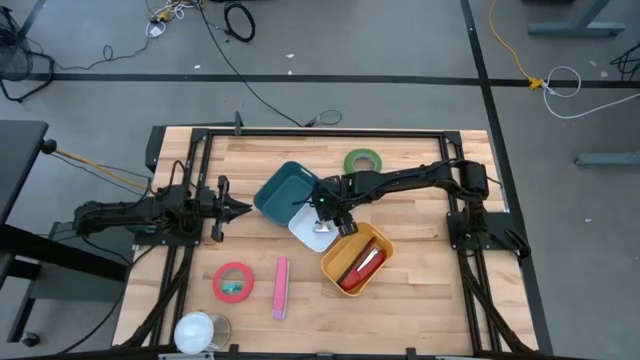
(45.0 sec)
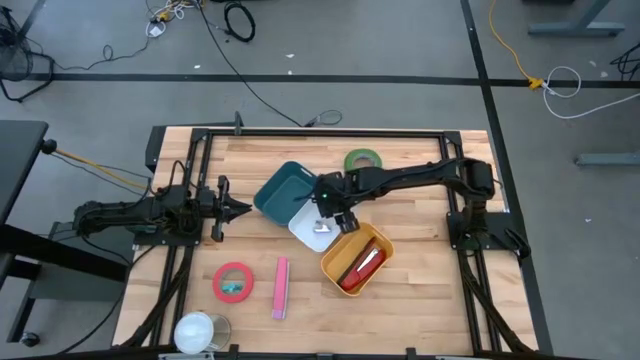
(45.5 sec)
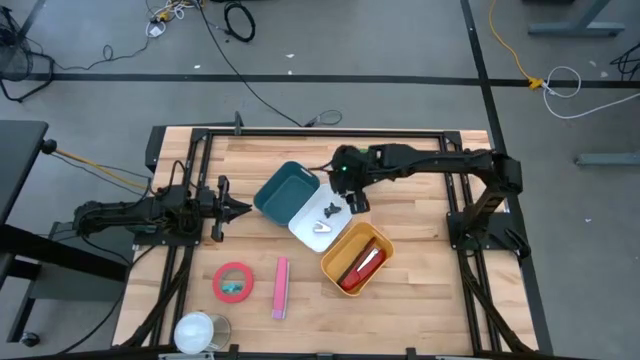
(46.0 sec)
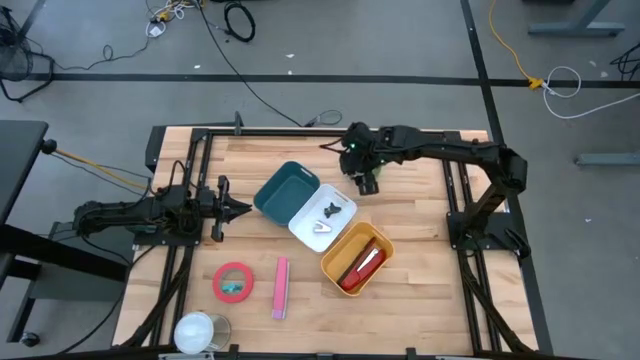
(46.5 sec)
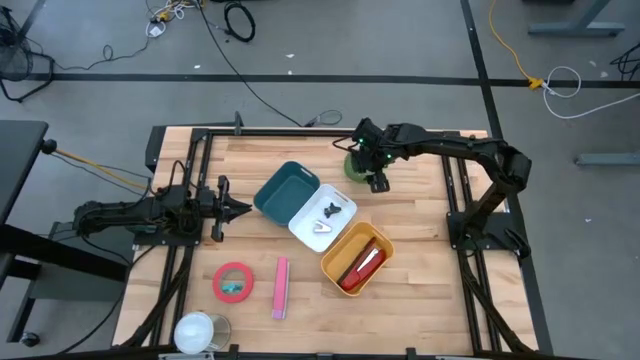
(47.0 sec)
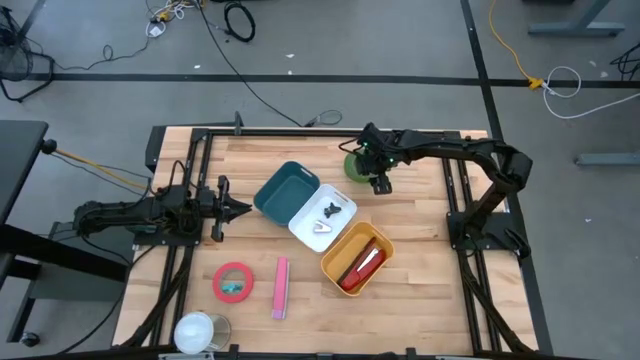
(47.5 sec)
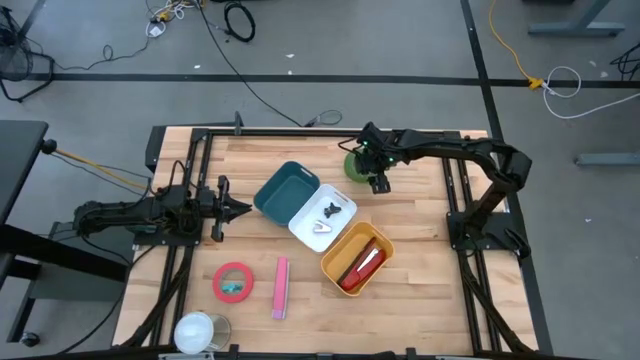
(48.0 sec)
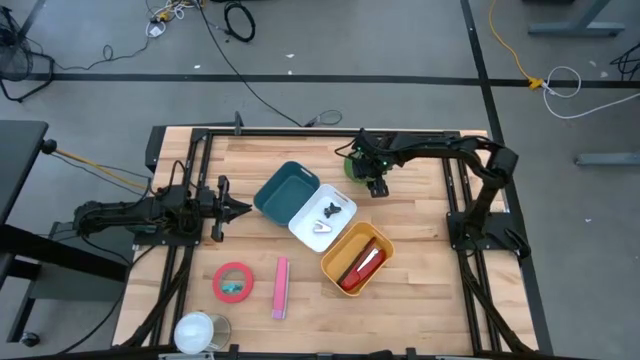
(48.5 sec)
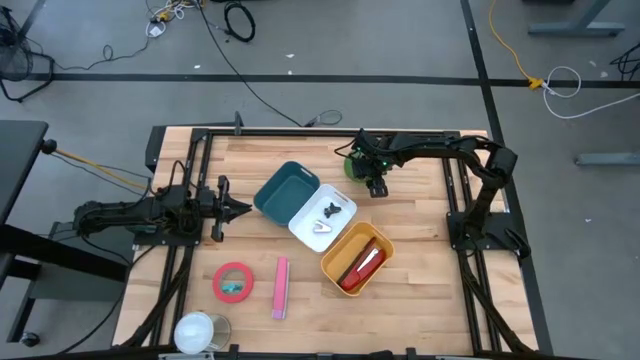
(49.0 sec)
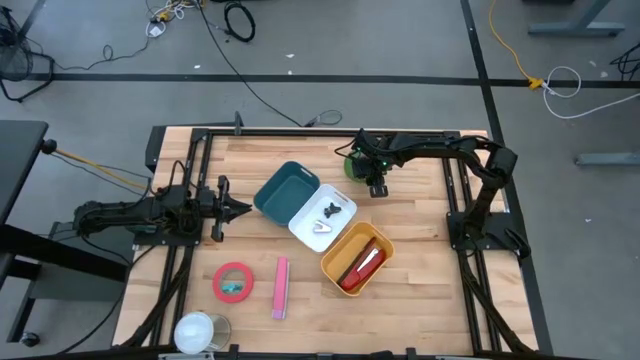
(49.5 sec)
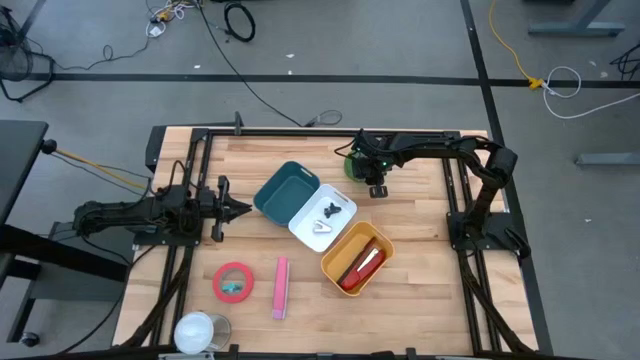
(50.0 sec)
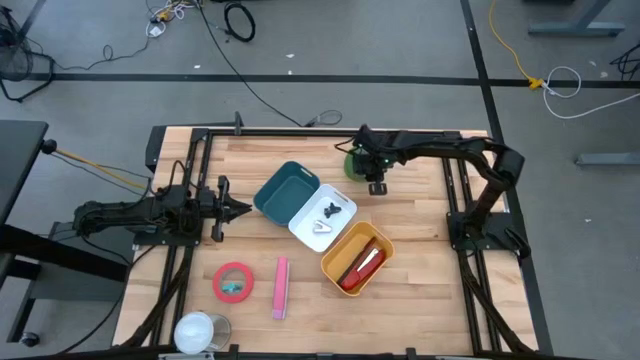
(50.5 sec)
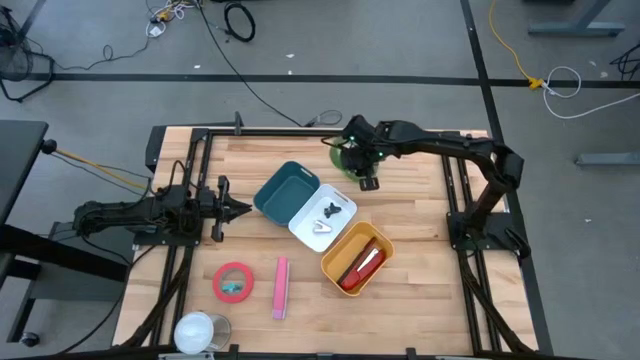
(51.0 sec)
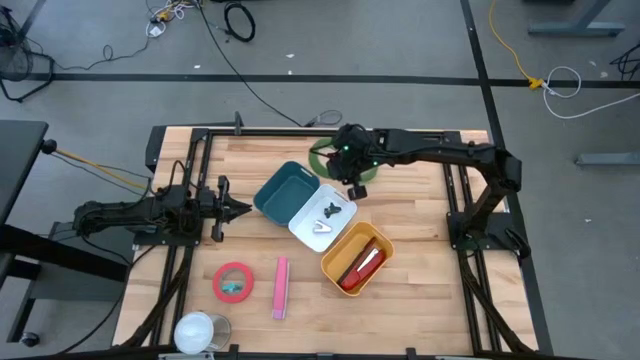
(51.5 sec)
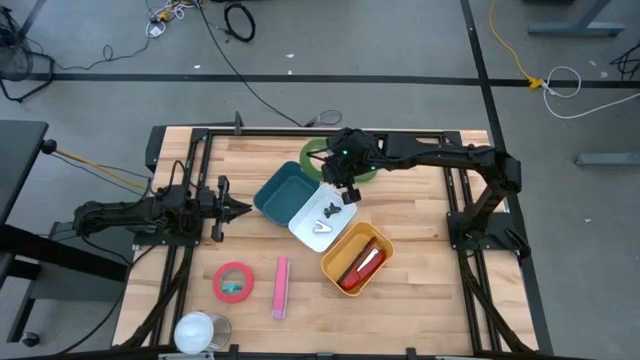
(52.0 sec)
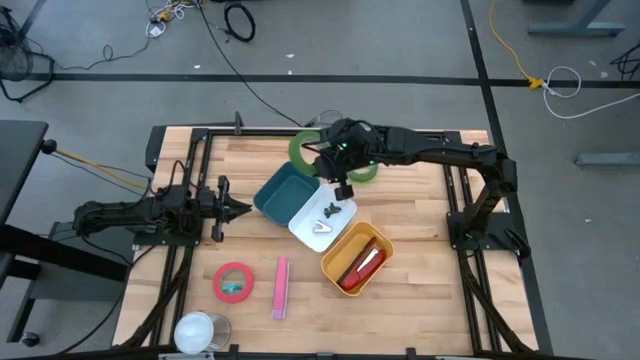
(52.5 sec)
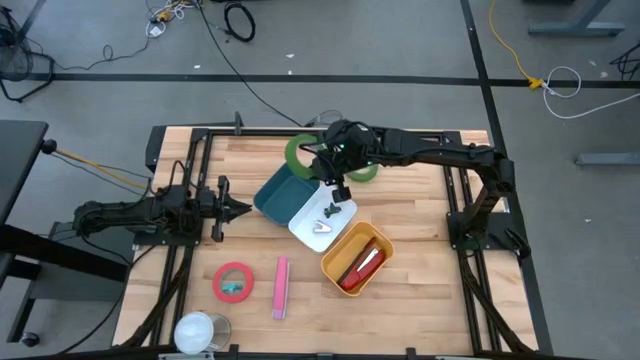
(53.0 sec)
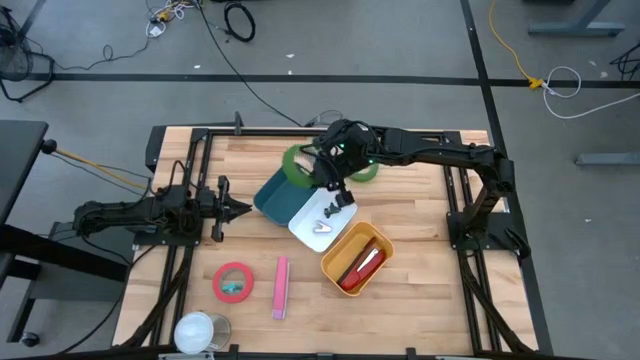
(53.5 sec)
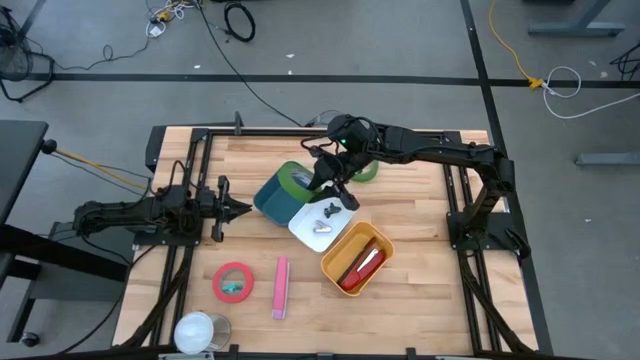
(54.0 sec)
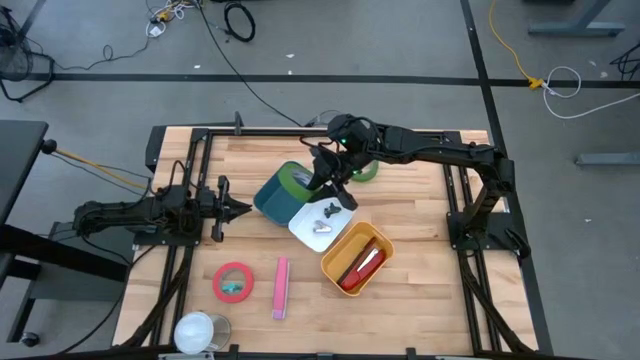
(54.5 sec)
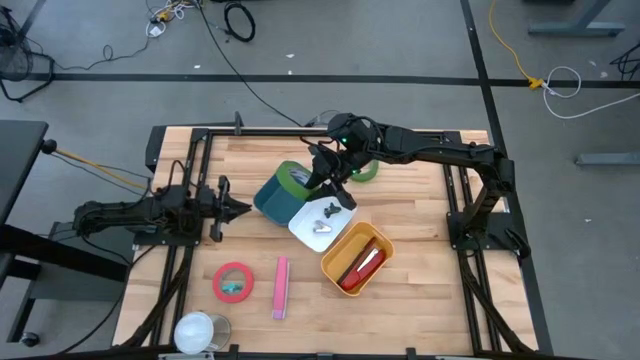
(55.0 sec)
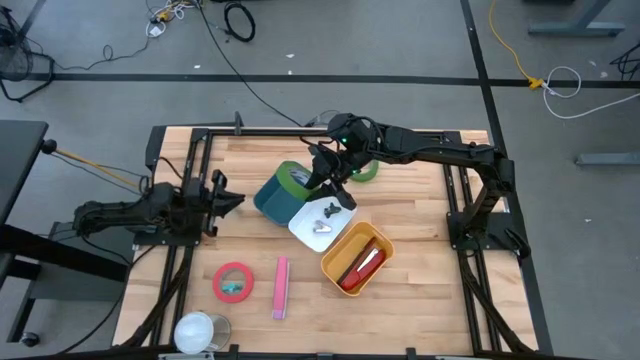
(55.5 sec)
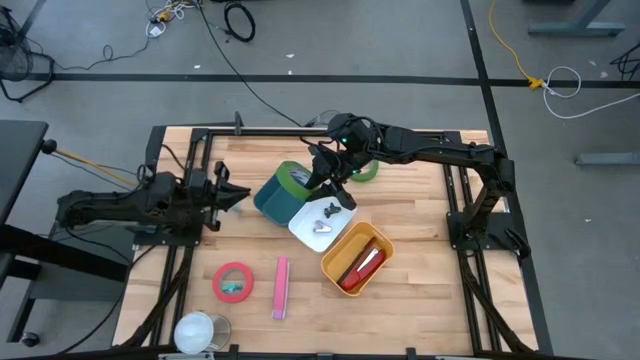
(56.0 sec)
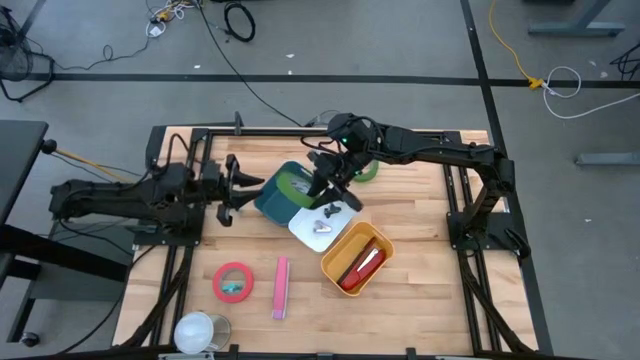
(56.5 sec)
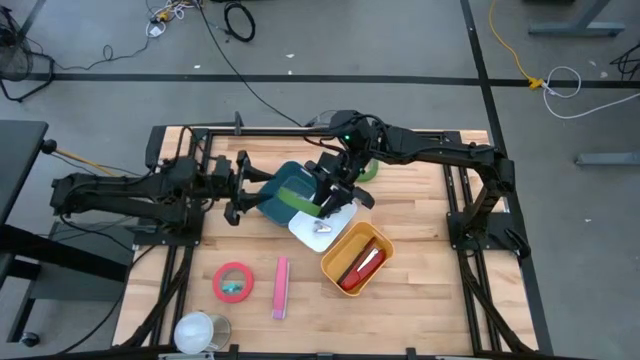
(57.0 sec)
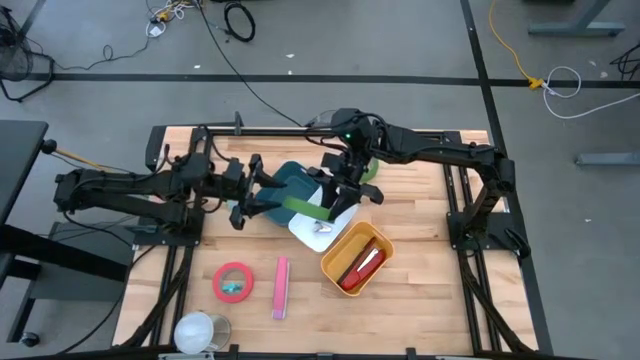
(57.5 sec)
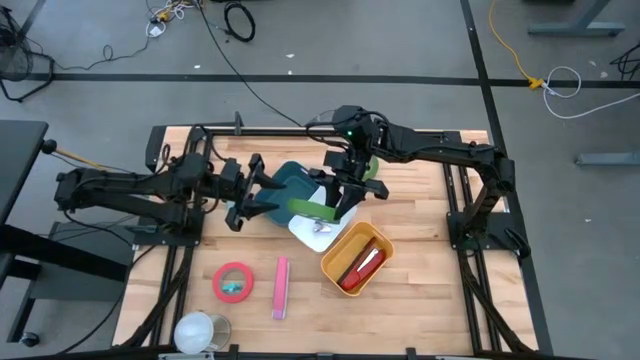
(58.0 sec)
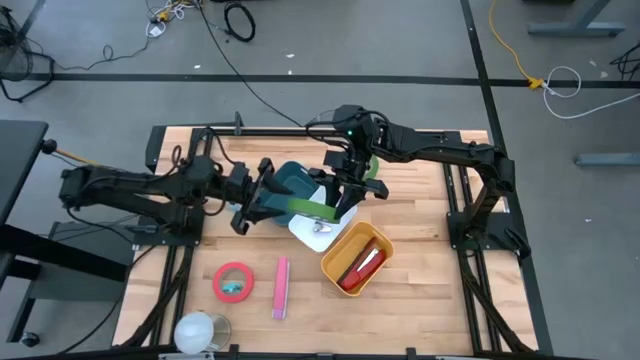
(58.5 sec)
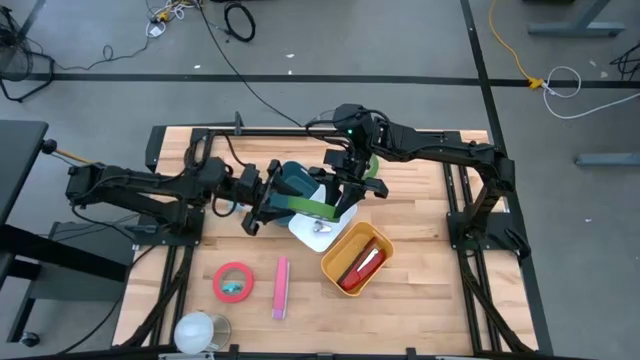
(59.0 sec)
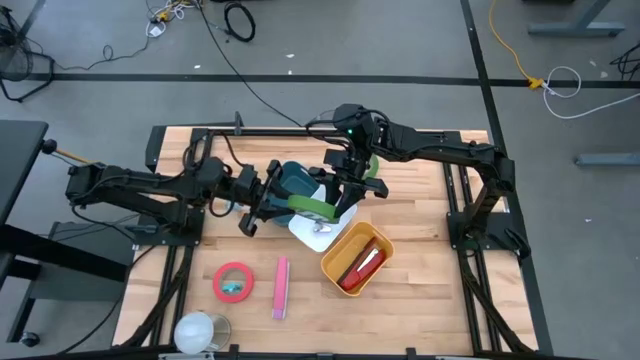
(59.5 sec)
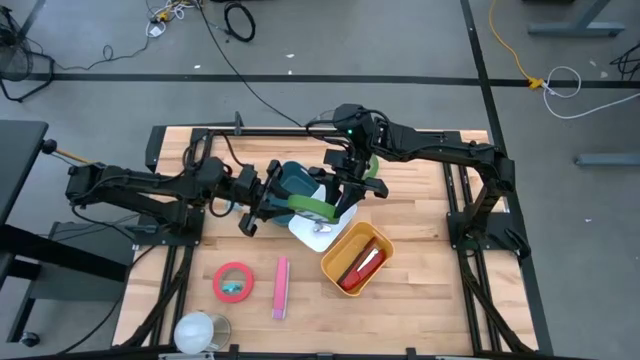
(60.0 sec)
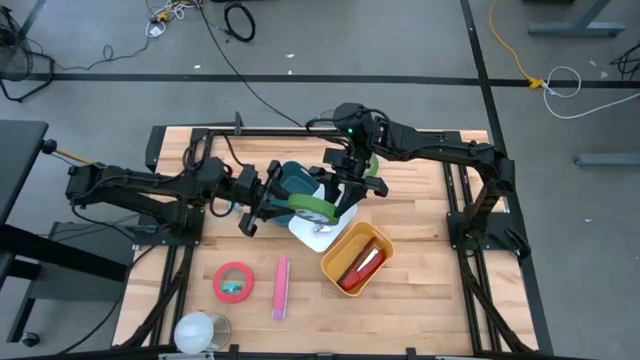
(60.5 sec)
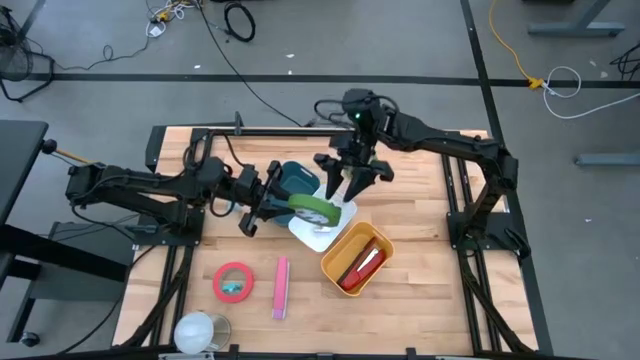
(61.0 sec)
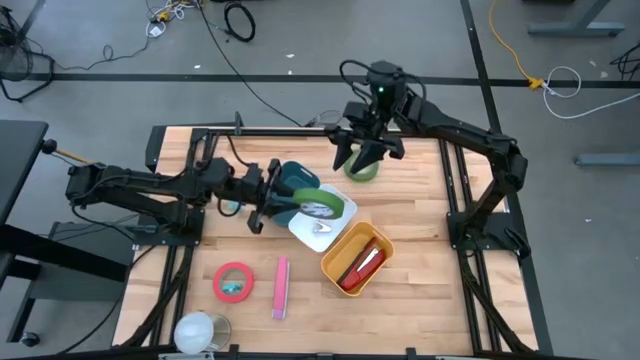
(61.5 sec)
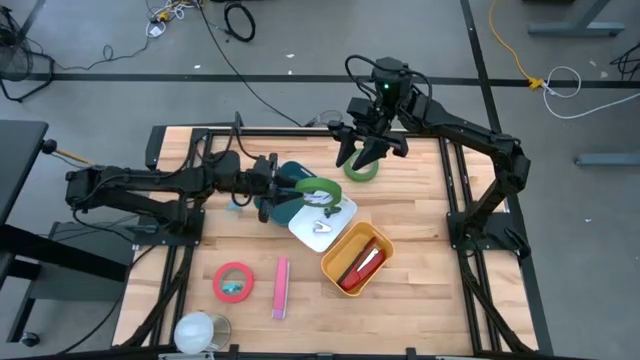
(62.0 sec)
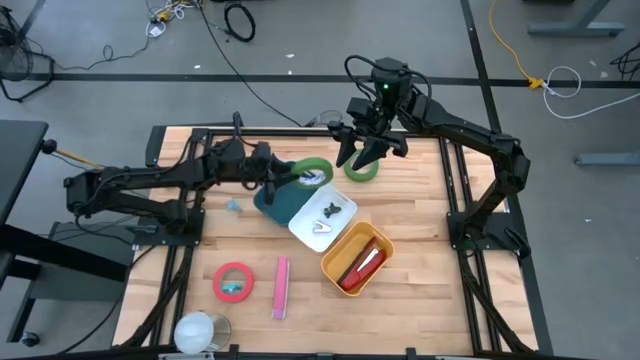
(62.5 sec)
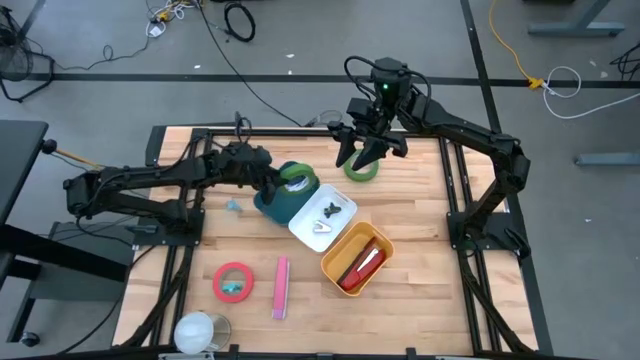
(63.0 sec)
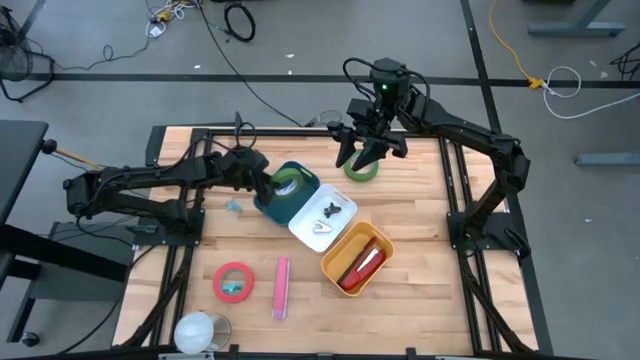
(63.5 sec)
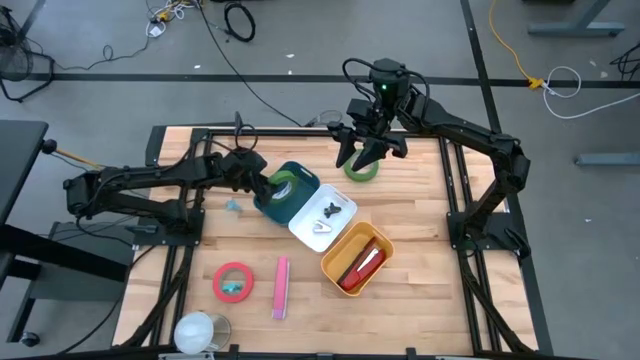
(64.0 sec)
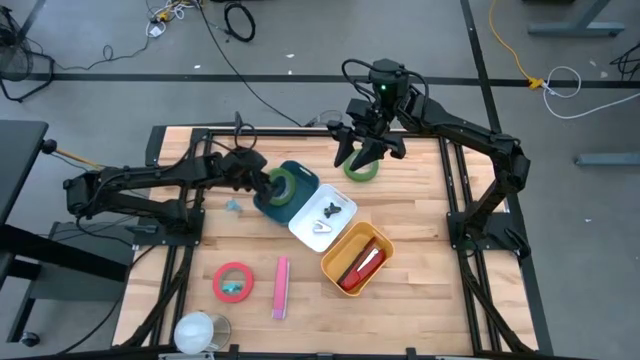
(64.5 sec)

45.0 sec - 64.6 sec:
Task: Pick and place Stapler, Stapler remover, tape
Put the green tape into the blue bin

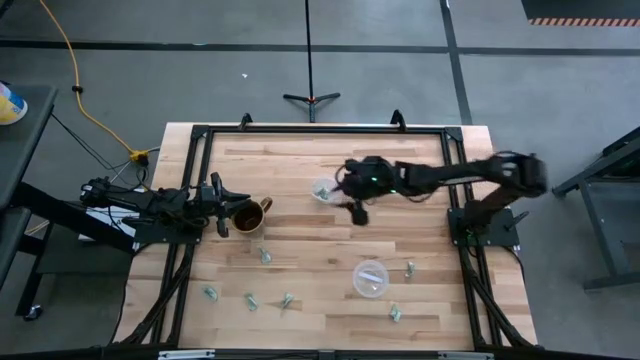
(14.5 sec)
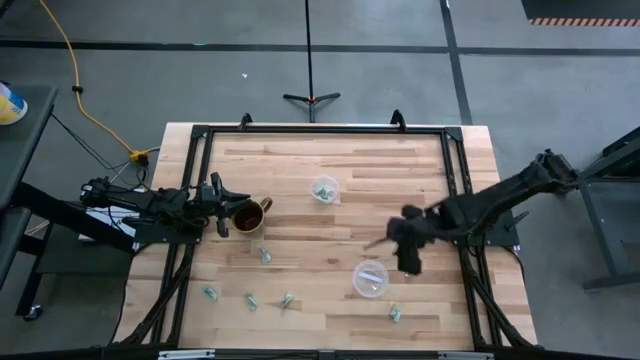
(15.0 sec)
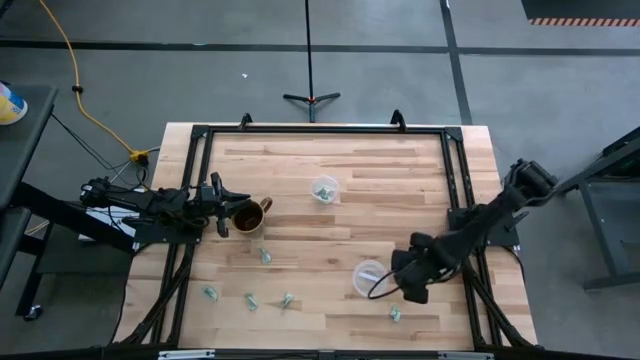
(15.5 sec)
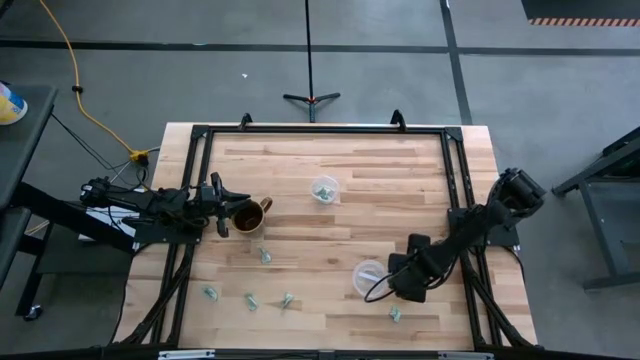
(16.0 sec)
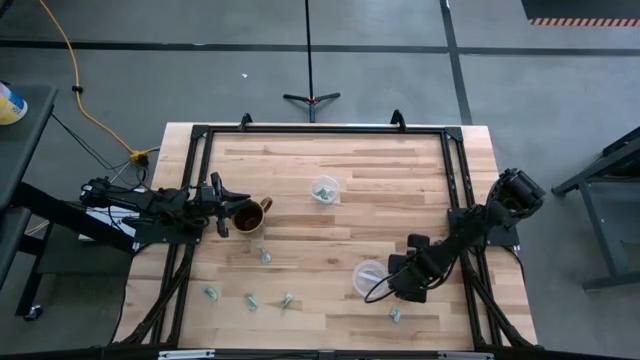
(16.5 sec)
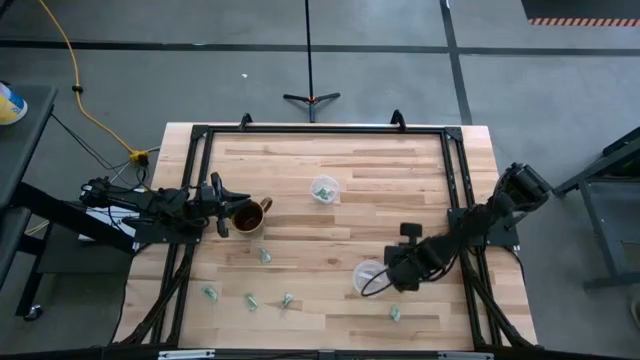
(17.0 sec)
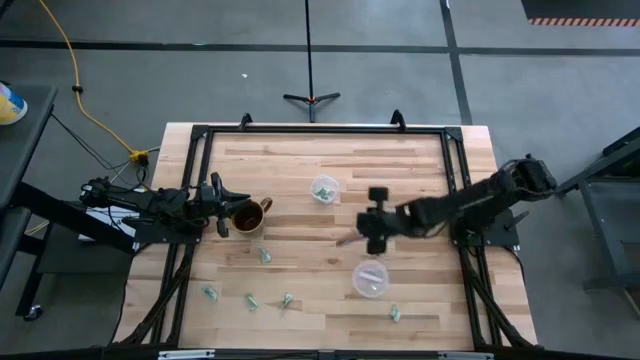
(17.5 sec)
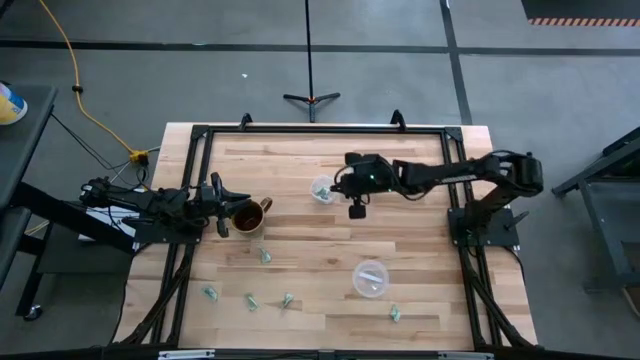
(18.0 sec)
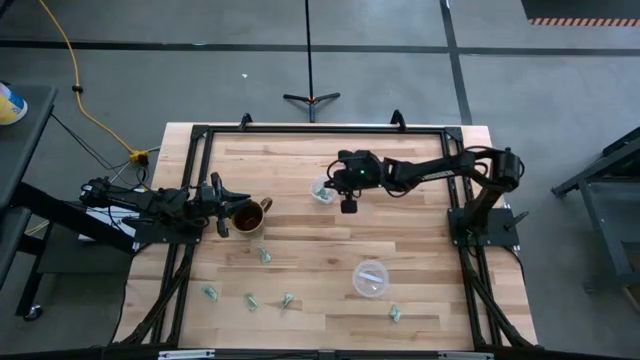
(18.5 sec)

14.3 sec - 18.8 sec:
Task: Pick and place Stevia / Truvia into bins
Put the stevia packet into the top transparent container
